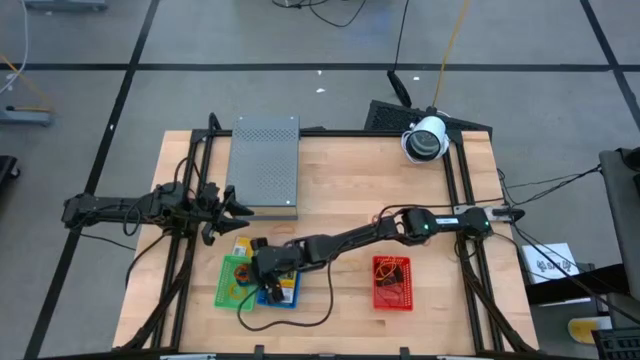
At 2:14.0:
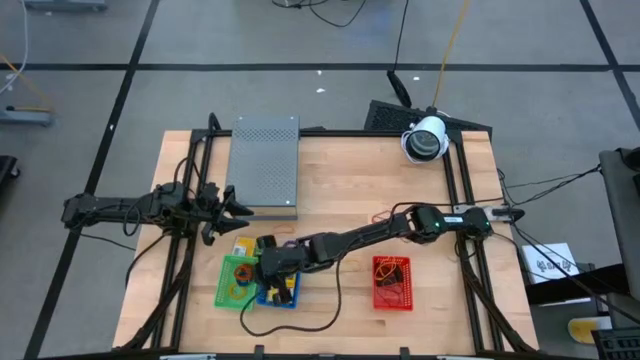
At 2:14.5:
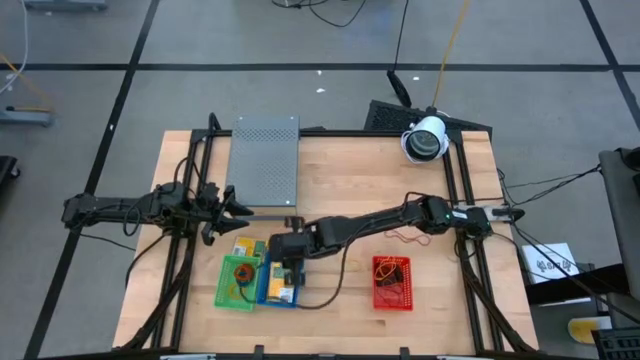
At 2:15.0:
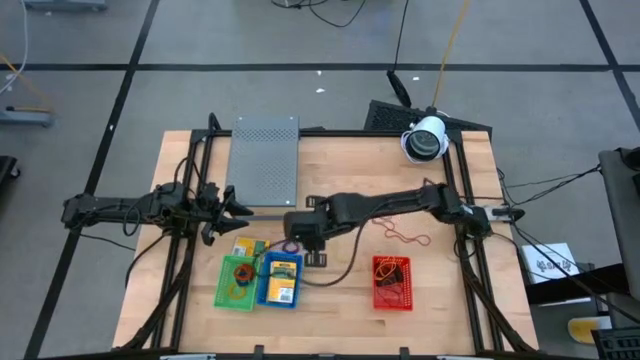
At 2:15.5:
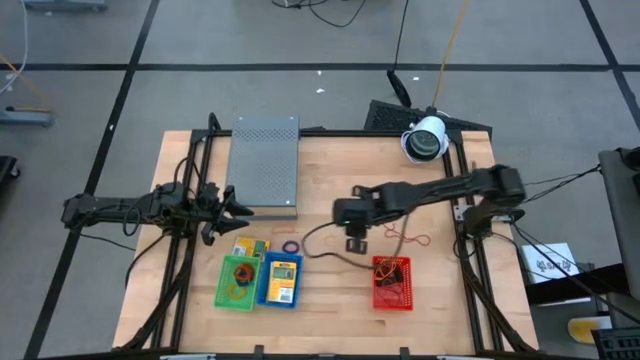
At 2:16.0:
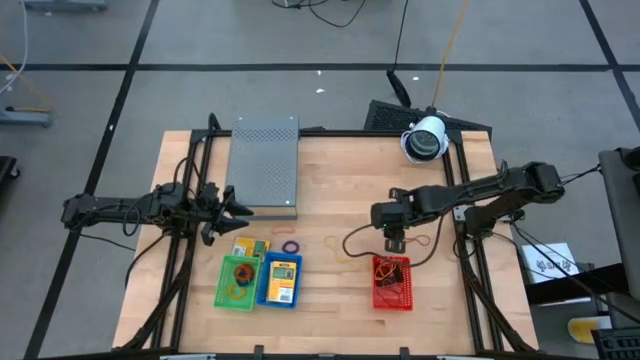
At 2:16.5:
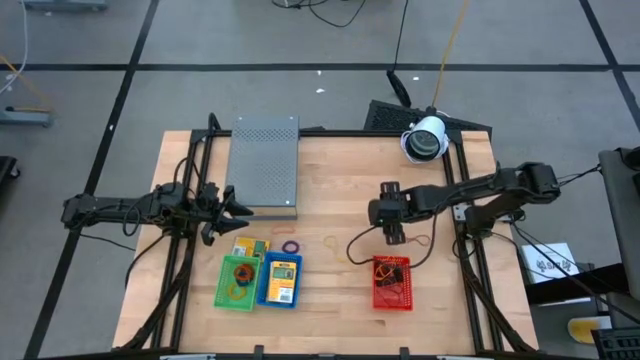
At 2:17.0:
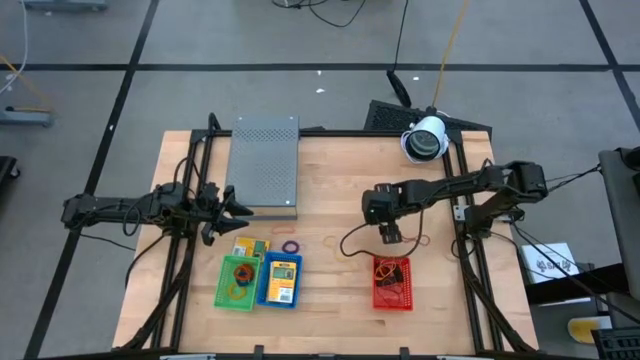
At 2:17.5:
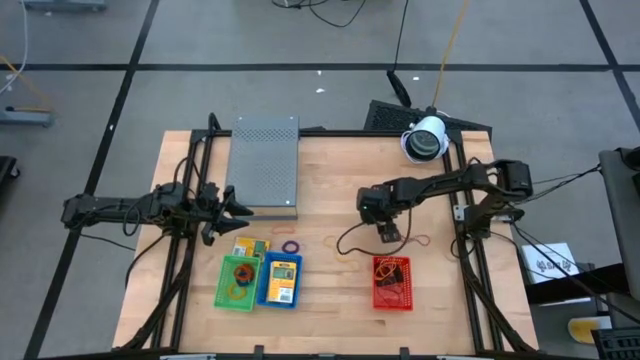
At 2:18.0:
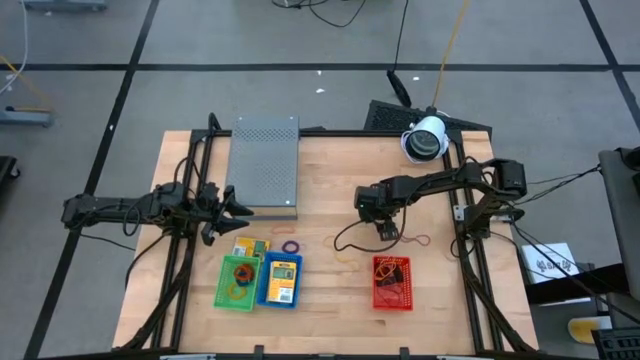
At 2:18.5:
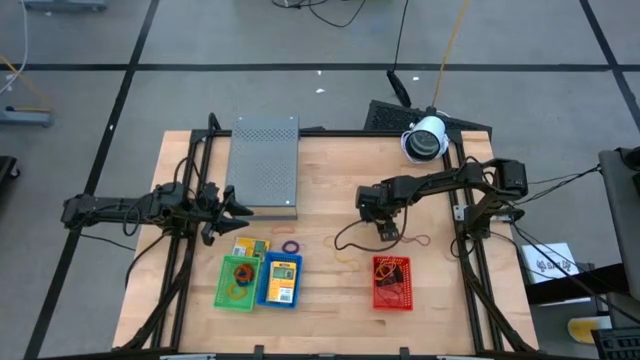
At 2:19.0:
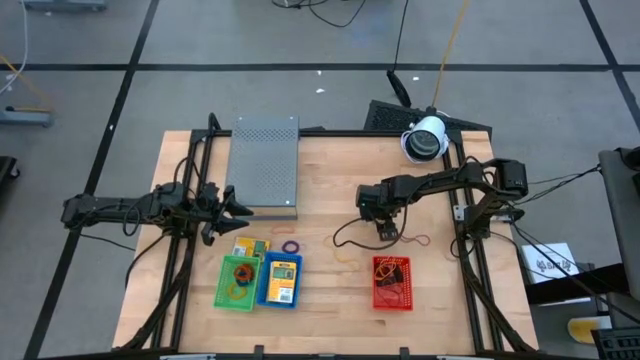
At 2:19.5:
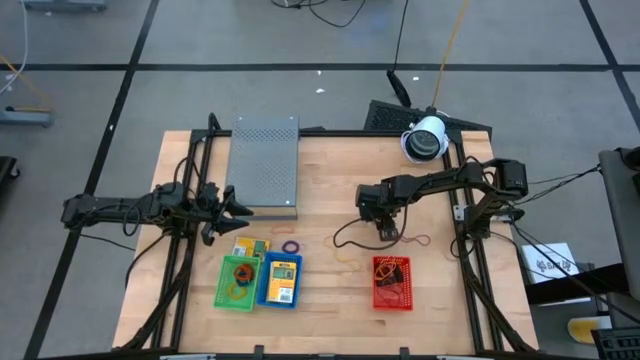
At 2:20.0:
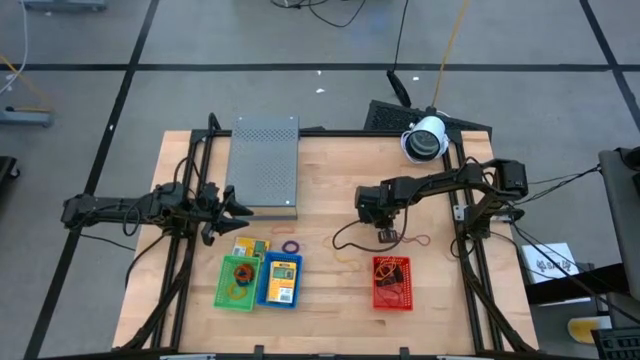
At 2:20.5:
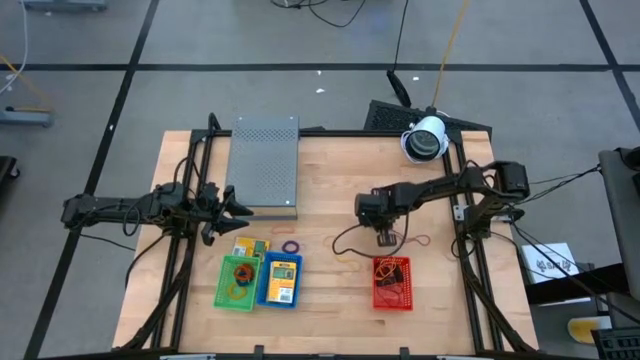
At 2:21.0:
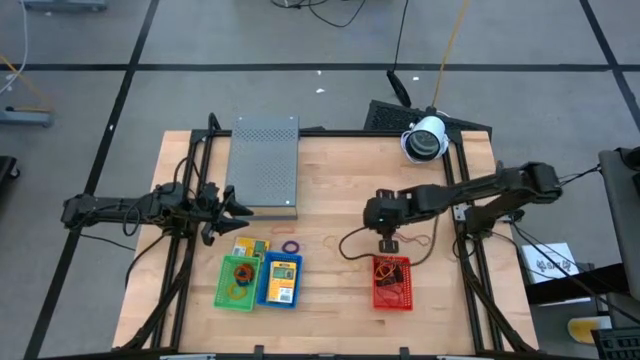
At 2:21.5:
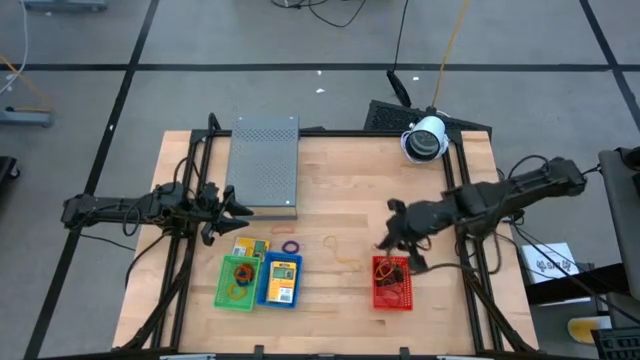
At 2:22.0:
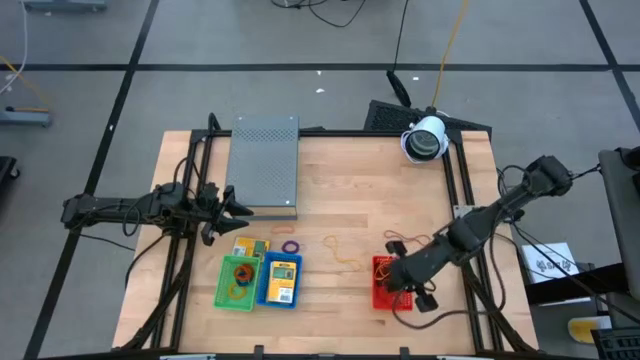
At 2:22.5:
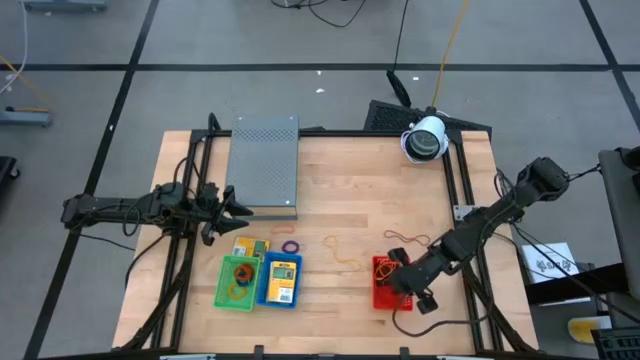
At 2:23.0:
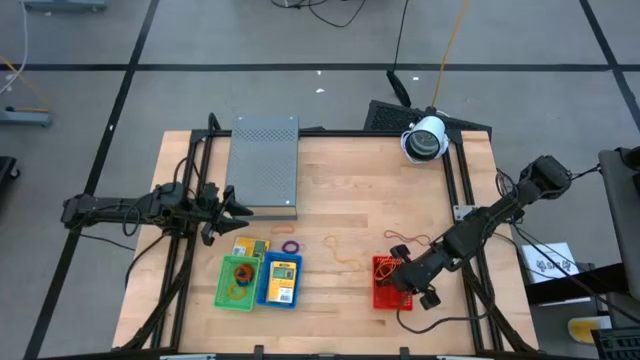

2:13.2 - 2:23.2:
Task: Pick & Place Office Desk Supplies
Put the red rubber band into the red bin

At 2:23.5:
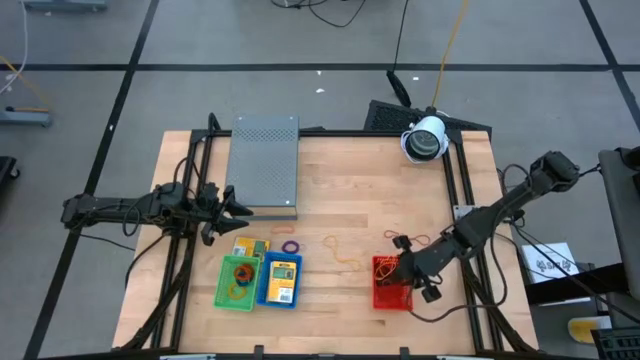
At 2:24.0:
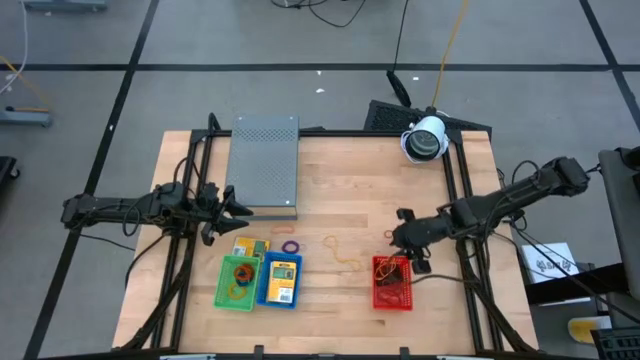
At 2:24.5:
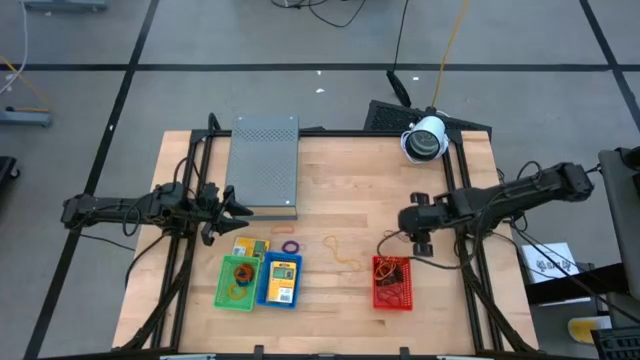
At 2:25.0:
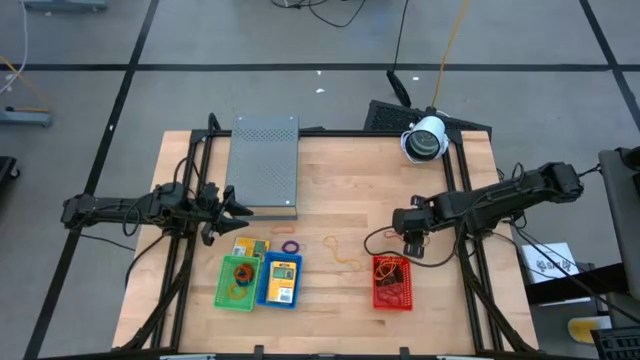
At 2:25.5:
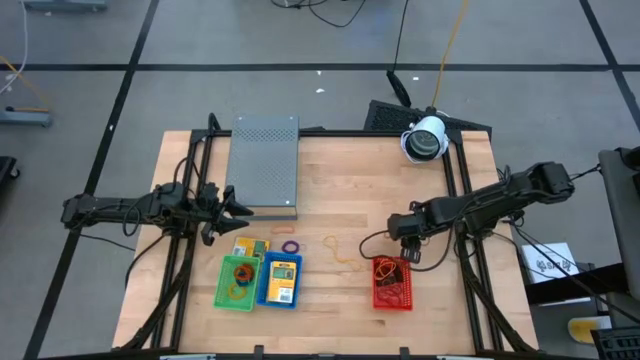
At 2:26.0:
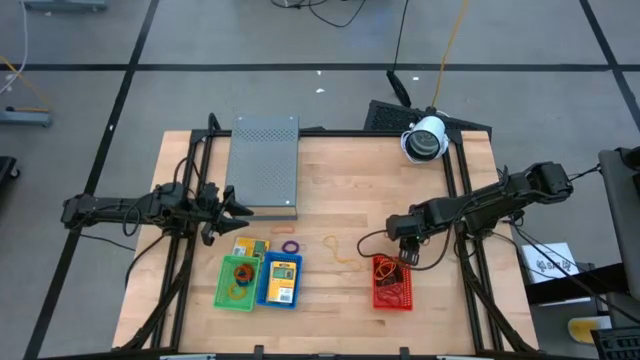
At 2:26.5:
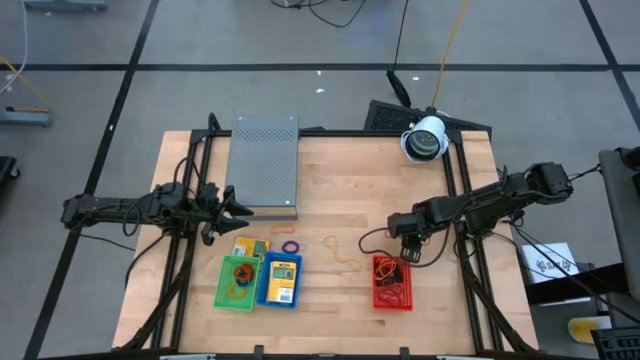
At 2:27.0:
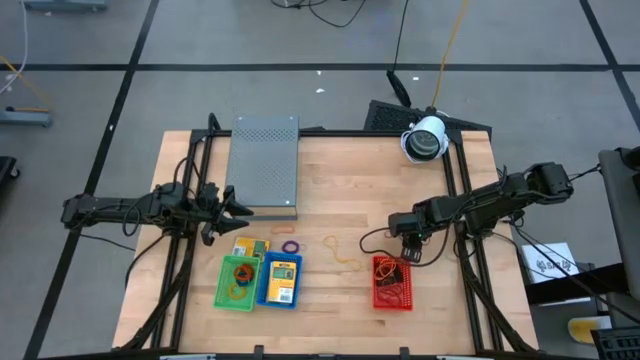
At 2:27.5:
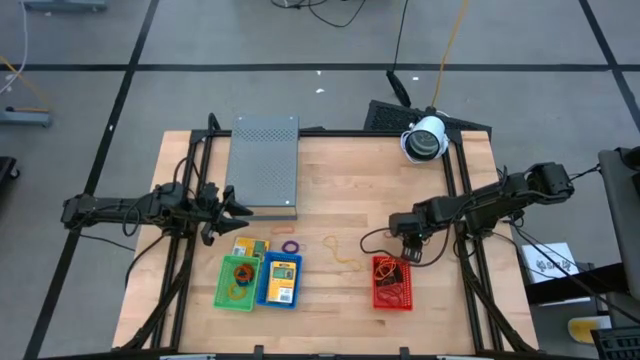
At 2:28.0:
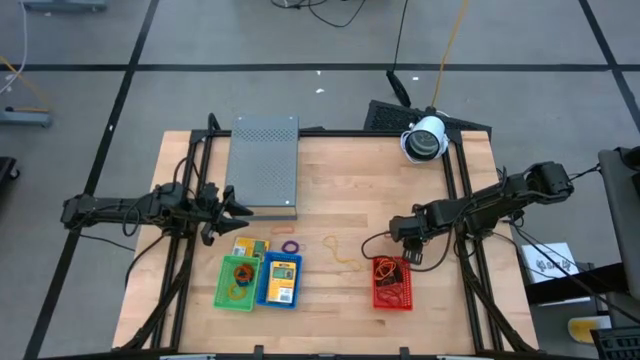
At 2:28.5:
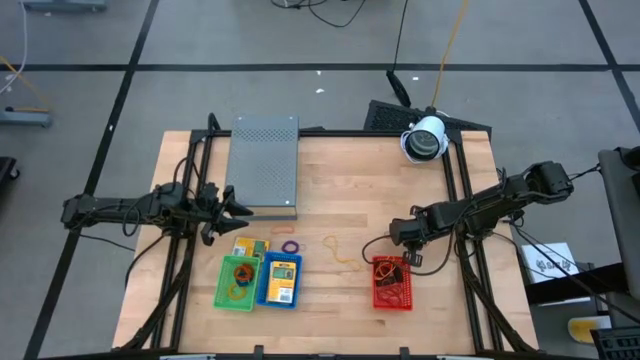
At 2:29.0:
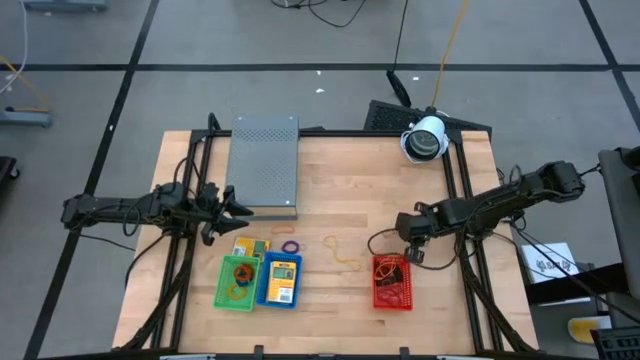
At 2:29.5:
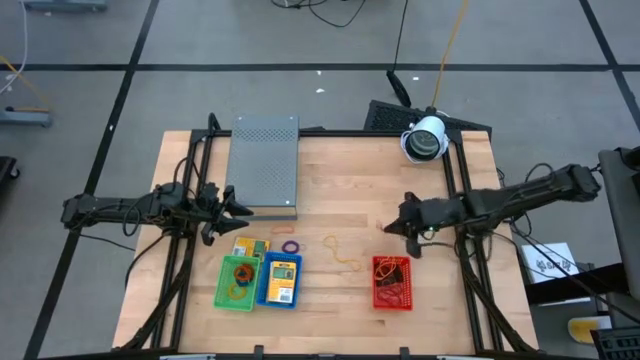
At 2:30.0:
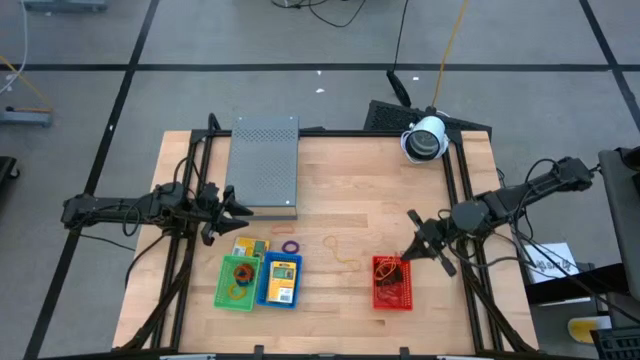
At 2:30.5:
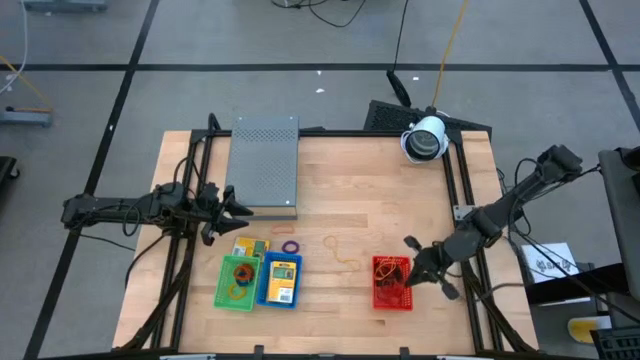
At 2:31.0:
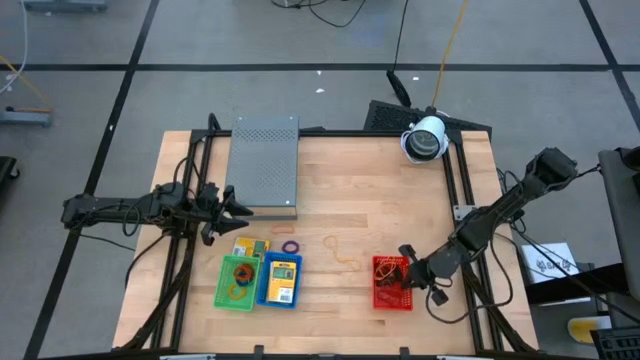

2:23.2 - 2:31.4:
Put the red rubber band into the red bin

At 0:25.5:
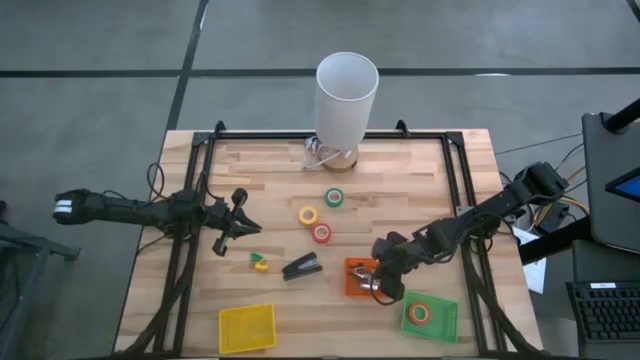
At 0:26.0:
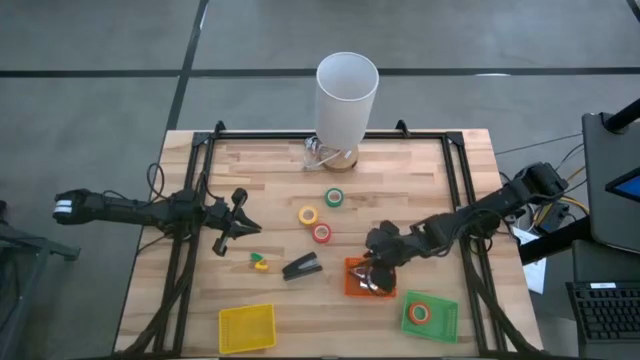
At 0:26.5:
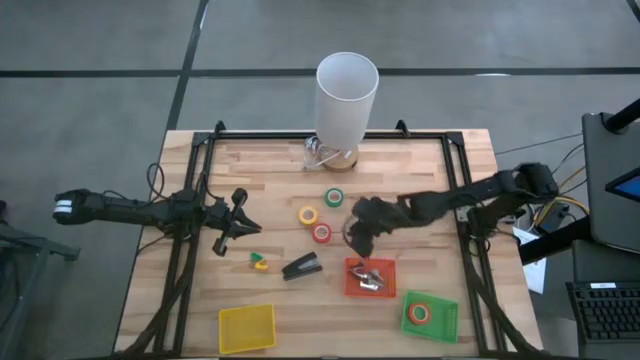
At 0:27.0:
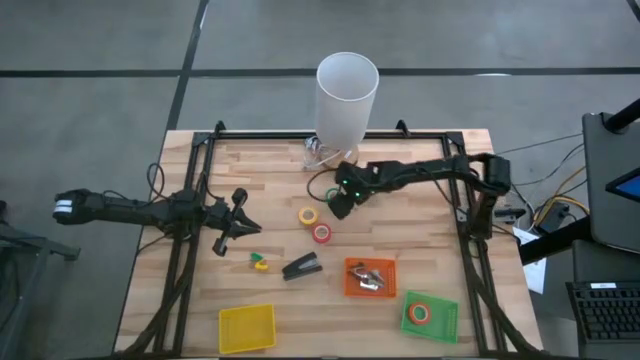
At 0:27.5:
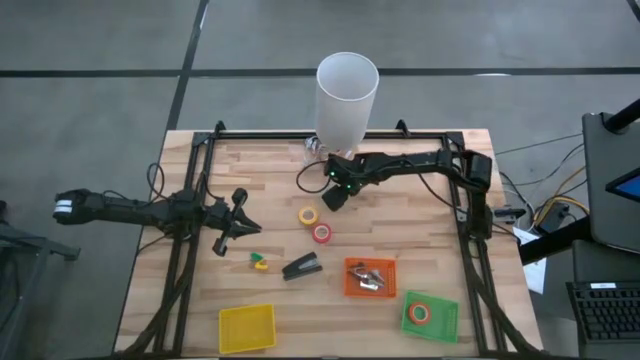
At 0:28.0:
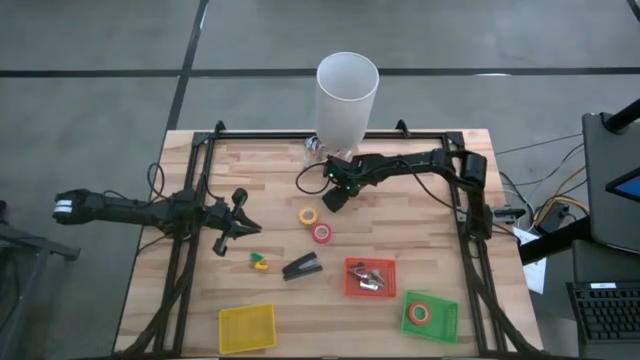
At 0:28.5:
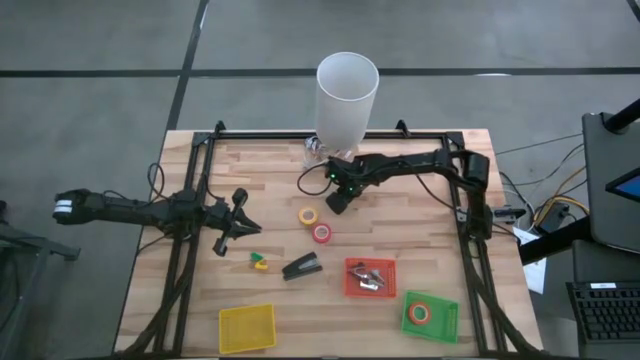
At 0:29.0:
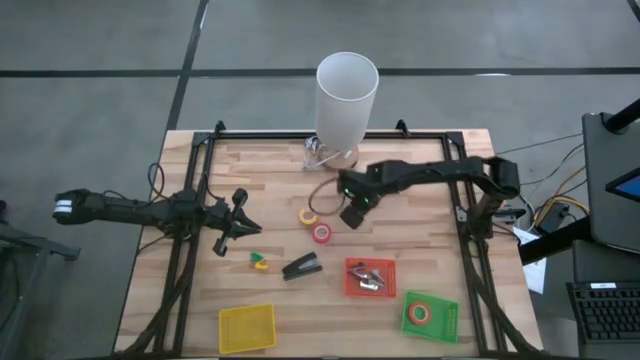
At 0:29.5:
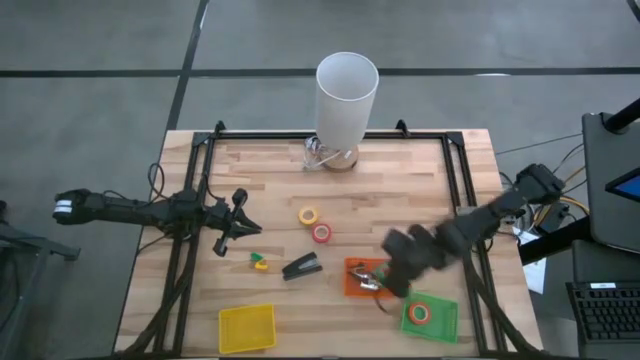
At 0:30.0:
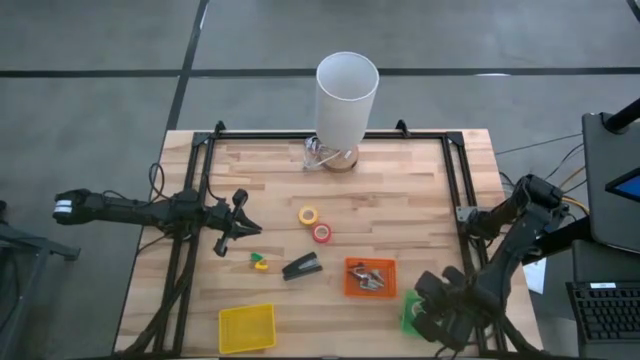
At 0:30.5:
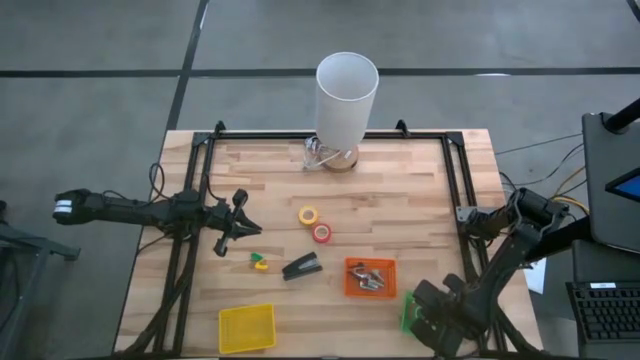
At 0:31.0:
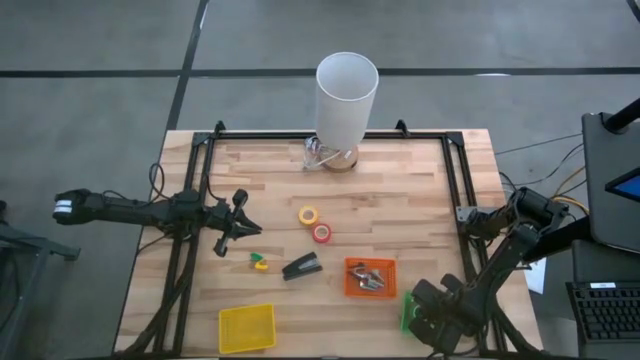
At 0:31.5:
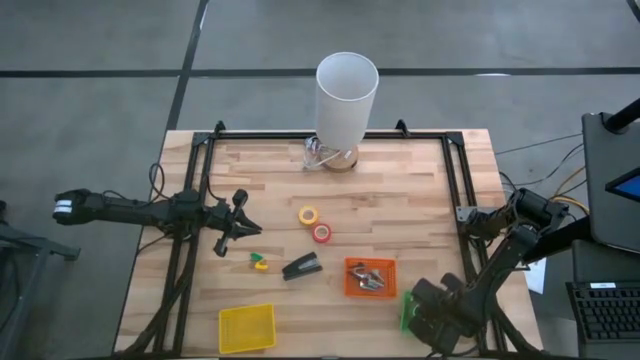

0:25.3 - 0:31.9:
Task: Pick and place Stapler, Stapler remover, tape
Put the green tape into the green basket
